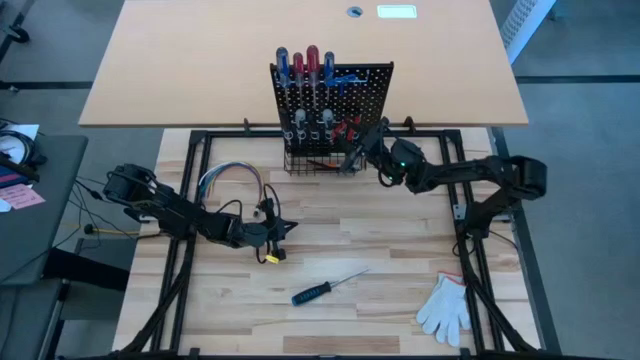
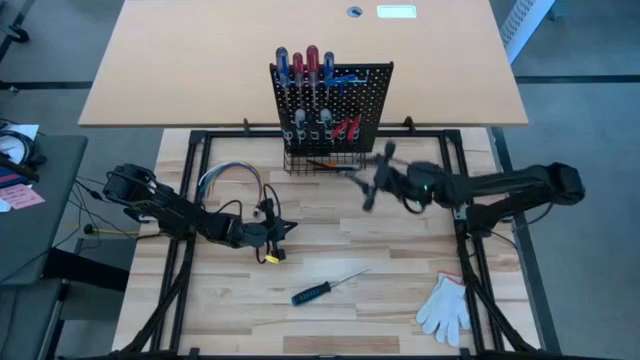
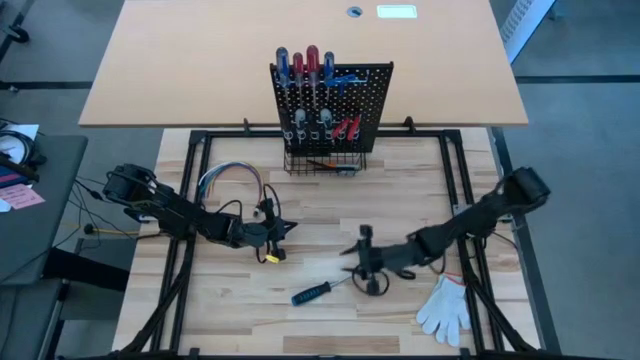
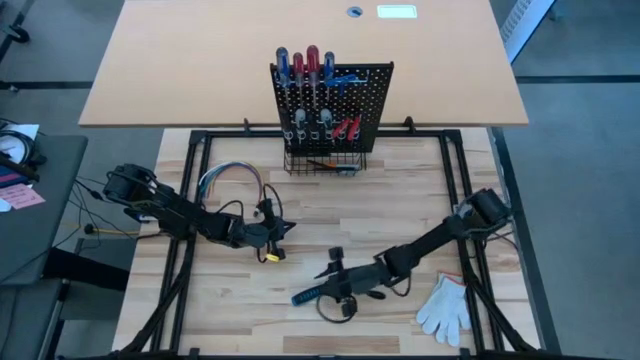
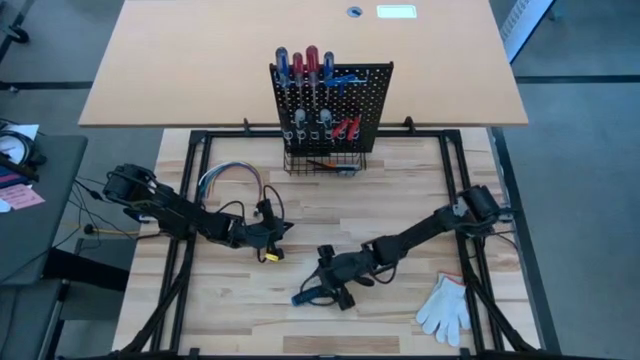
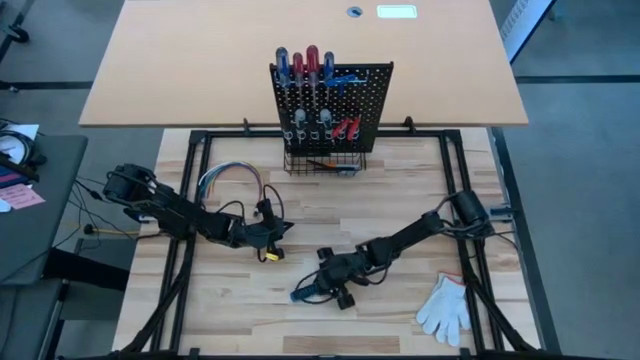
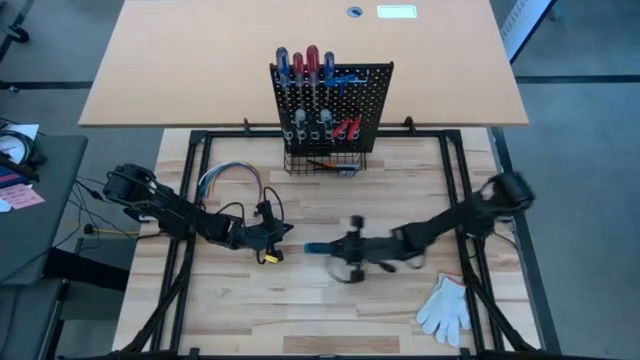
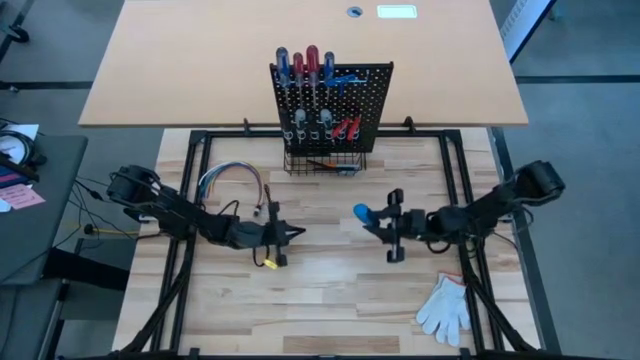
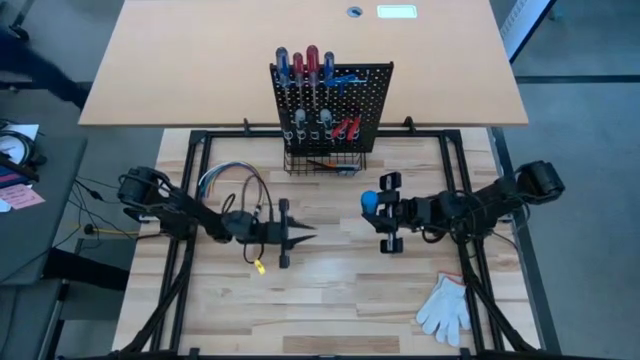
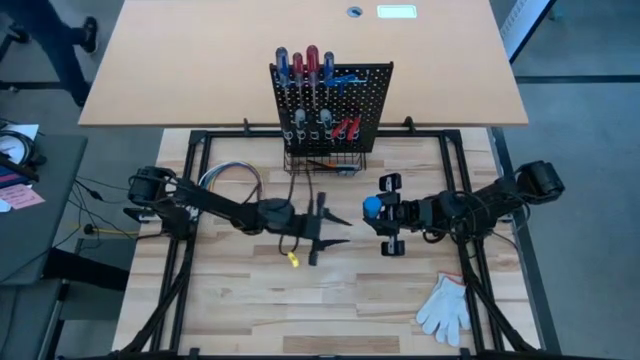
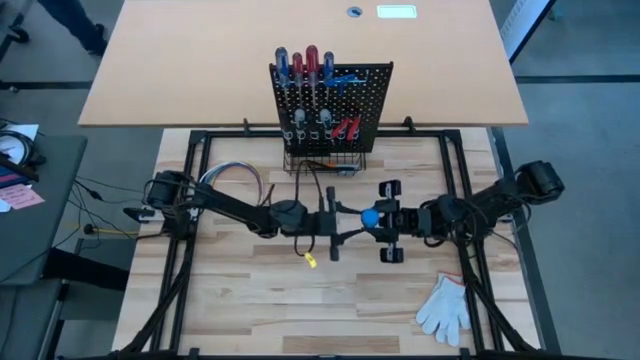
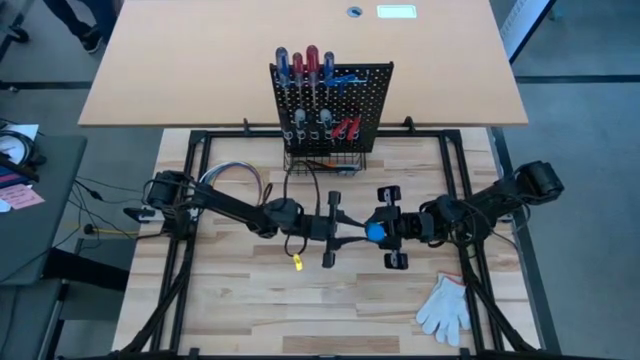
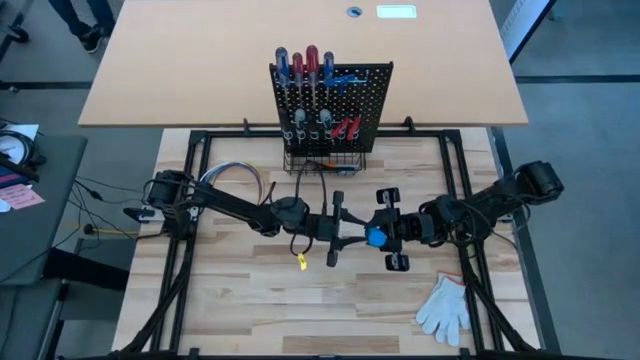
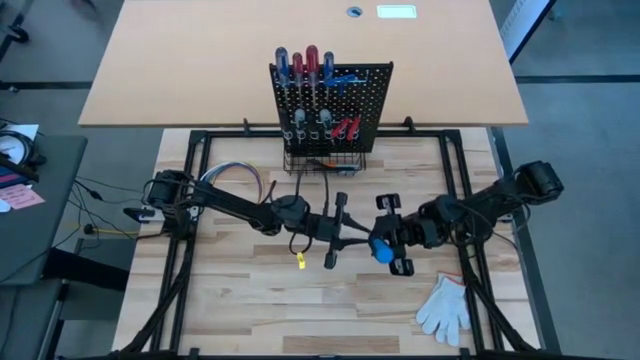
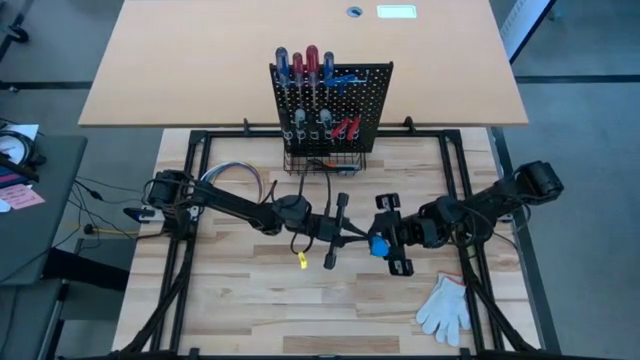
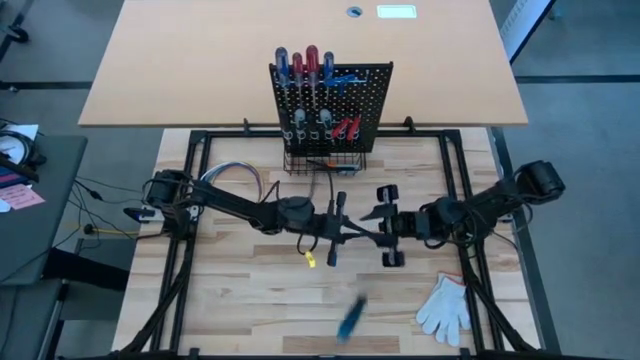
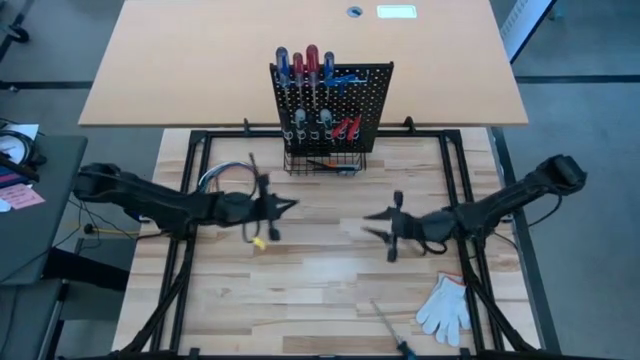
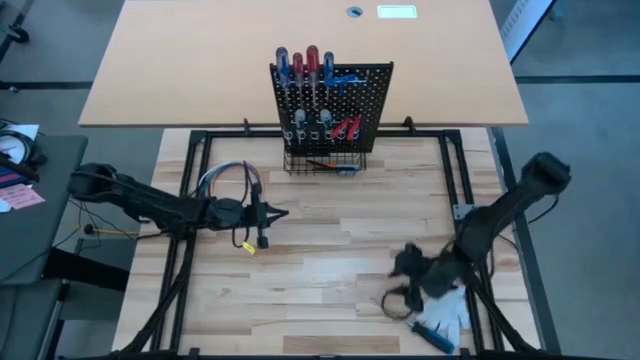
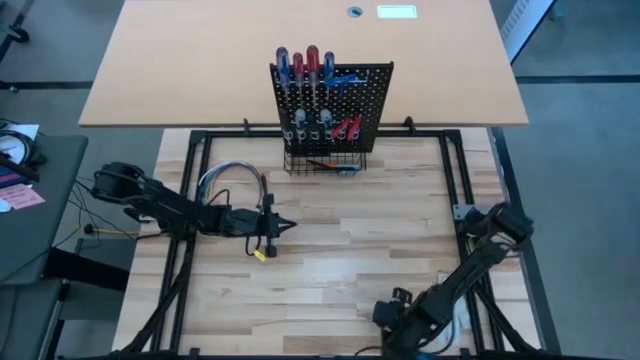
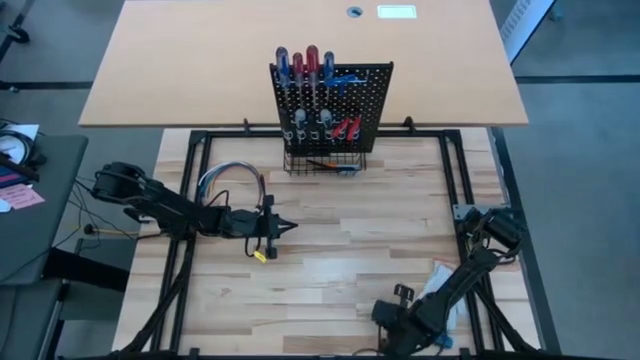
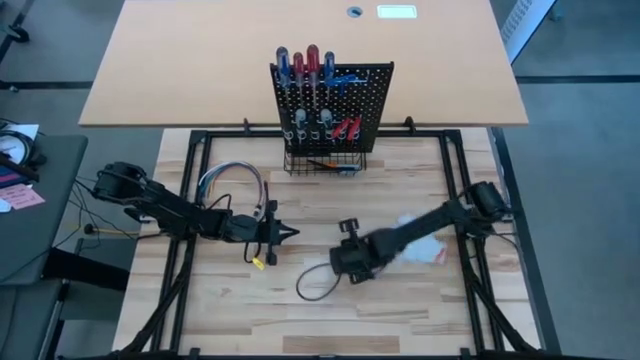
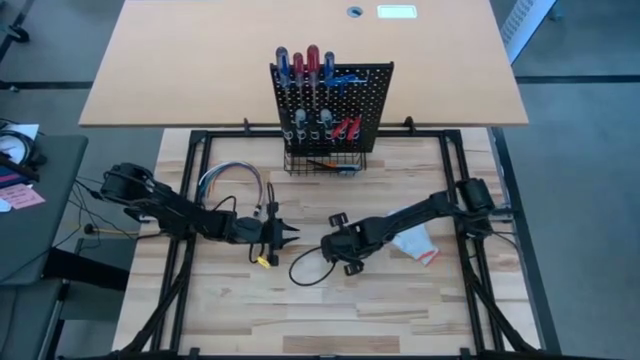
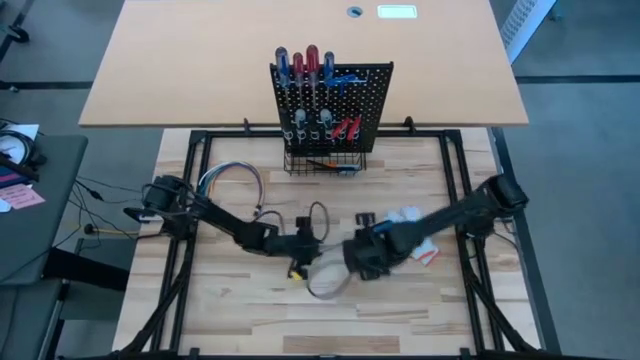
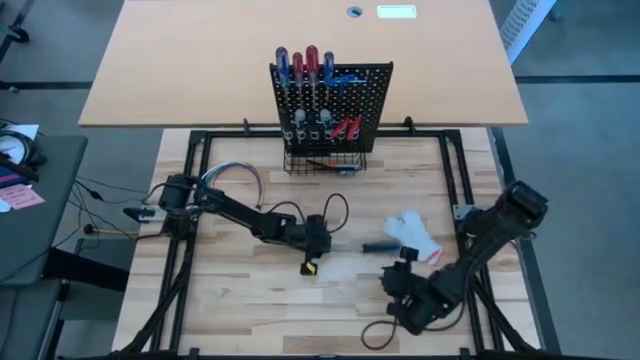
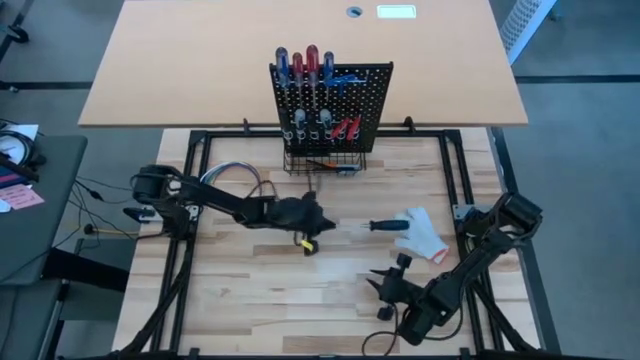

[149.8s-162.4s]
Task: Hang tools onto peg board
Hang the dark blue screwdriver on the pegboard

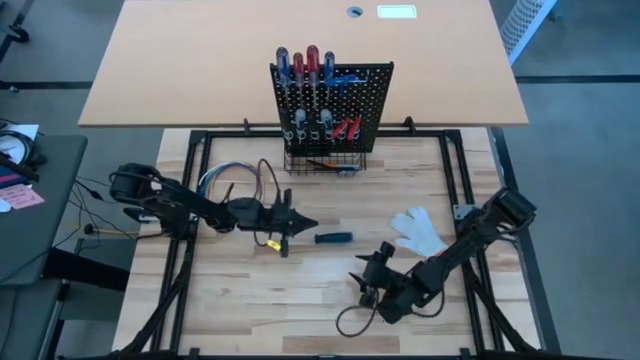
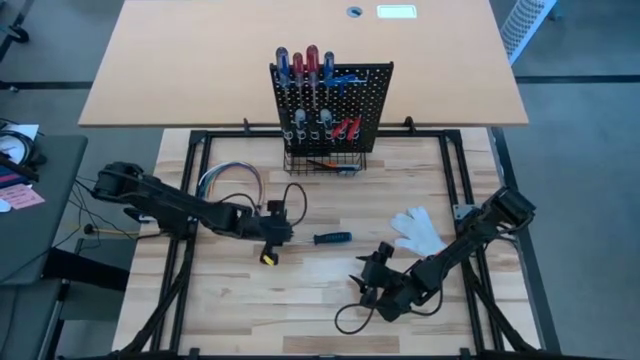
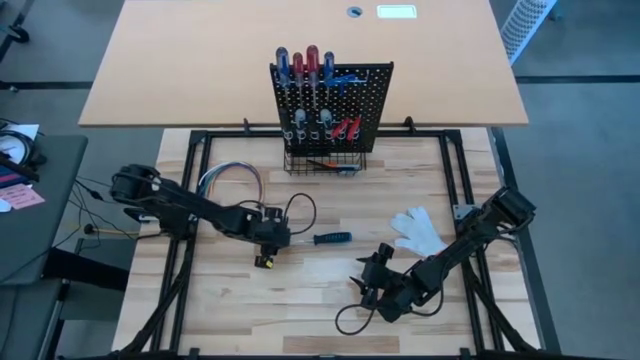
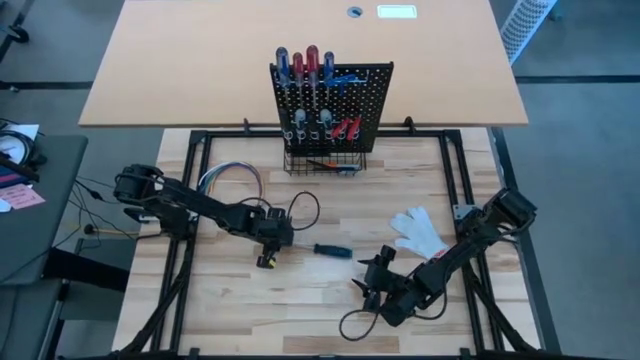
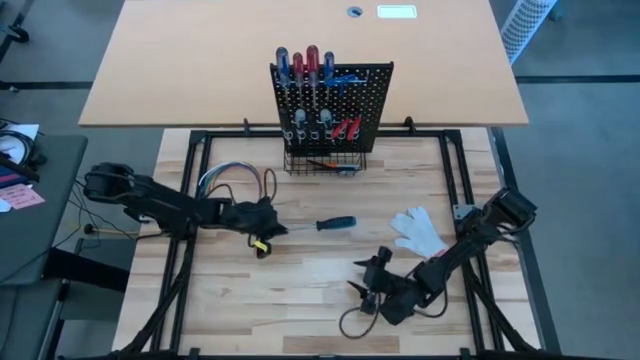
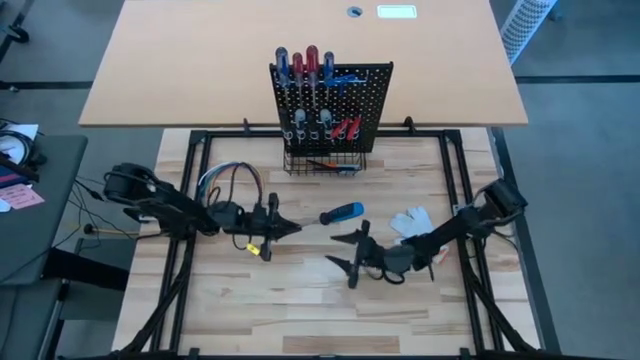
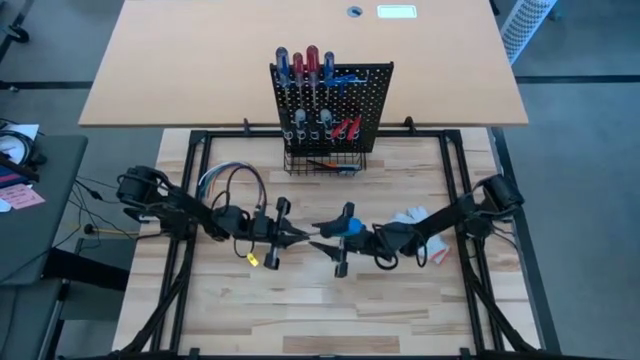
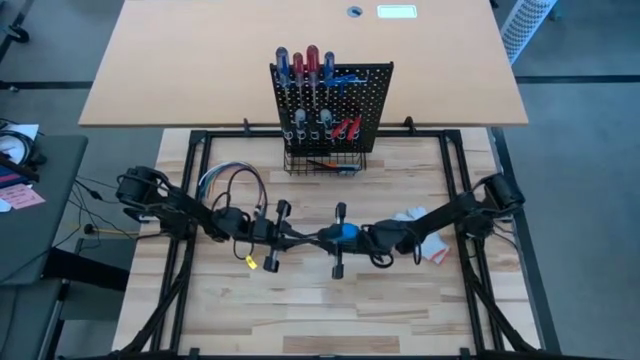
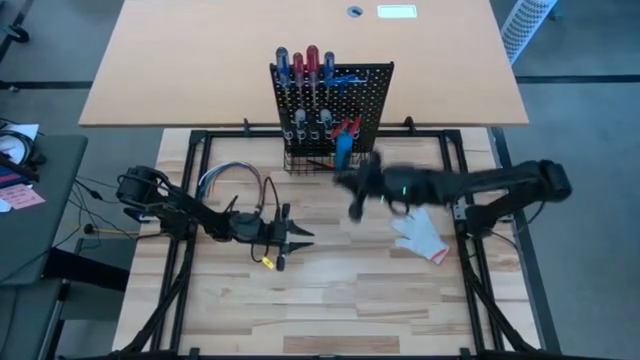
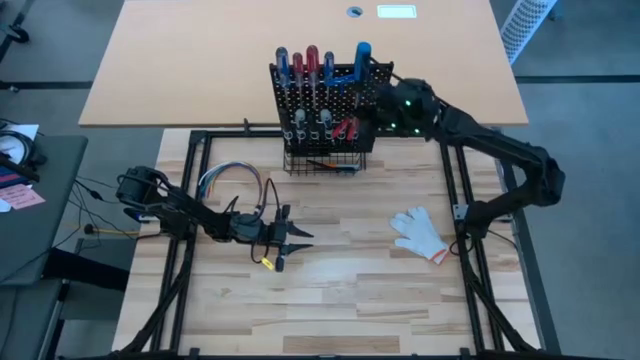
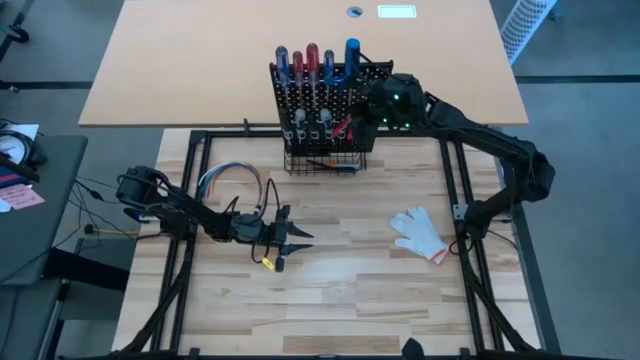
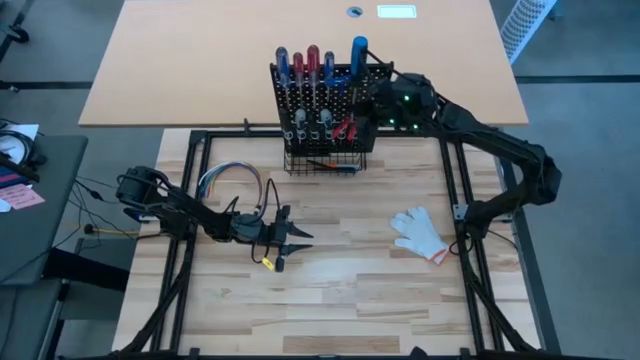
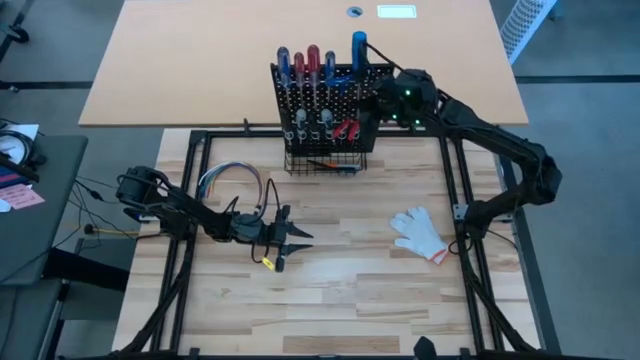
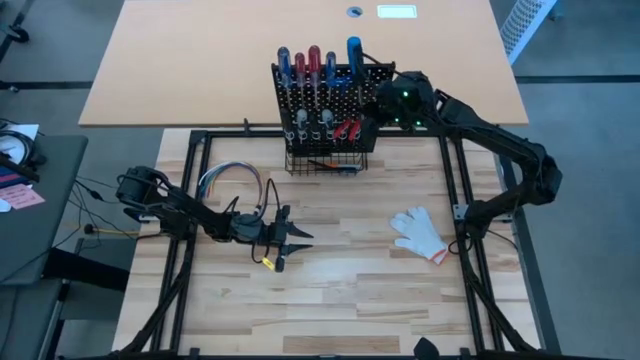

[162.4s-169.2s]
Hang the dark blue screwdriver on the pegboard

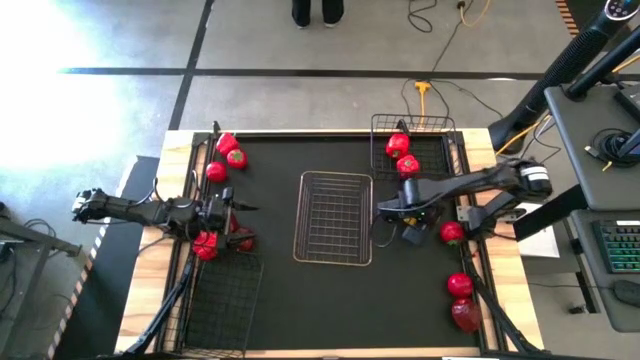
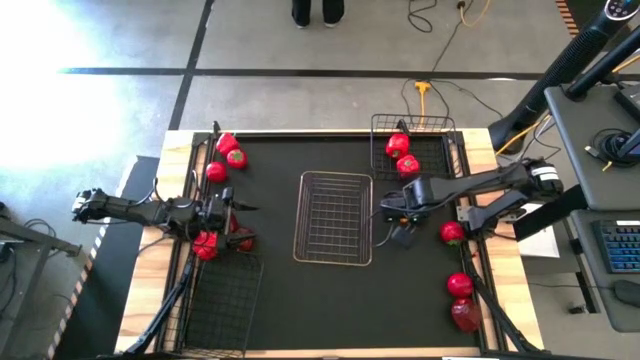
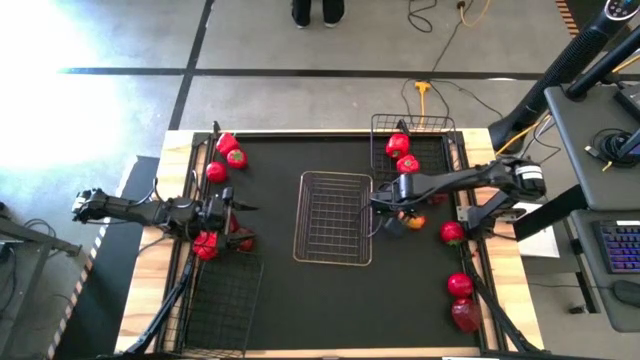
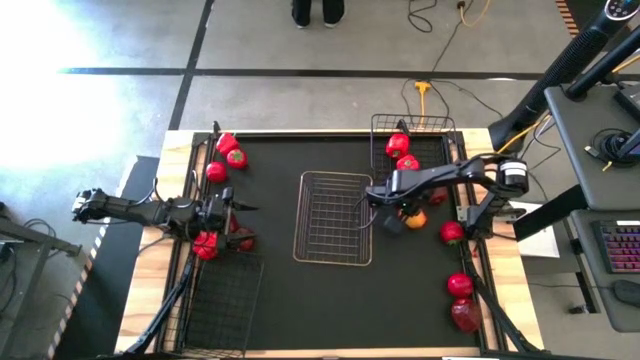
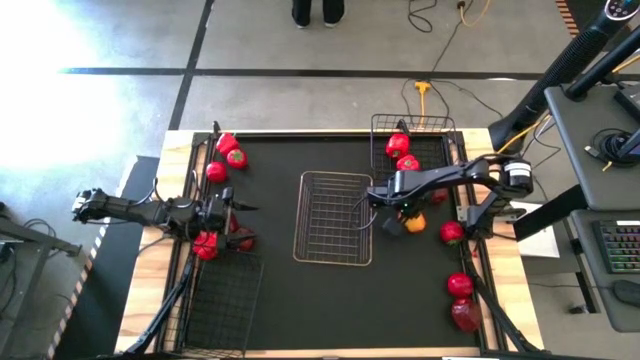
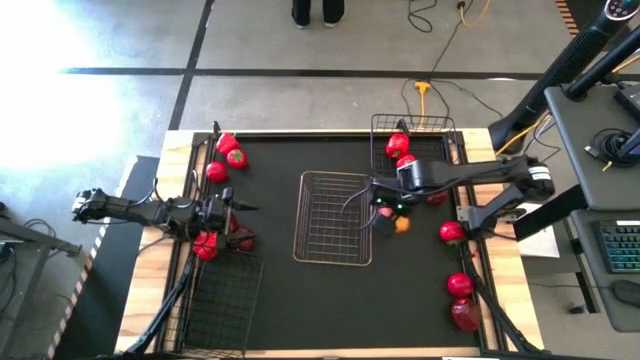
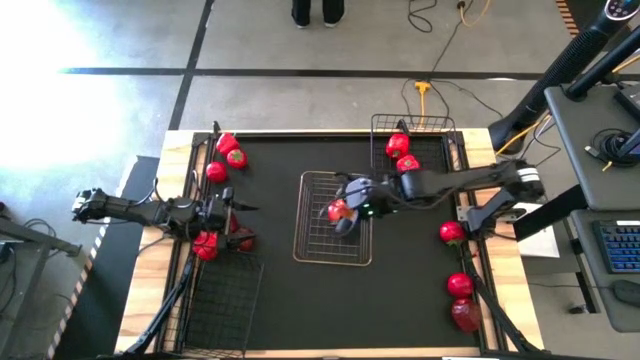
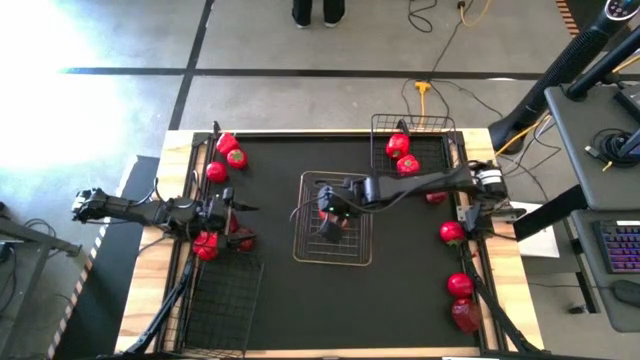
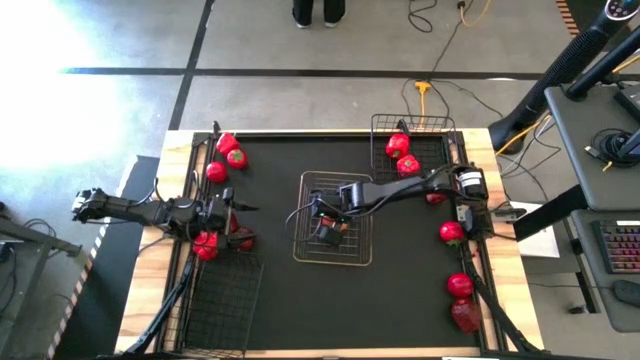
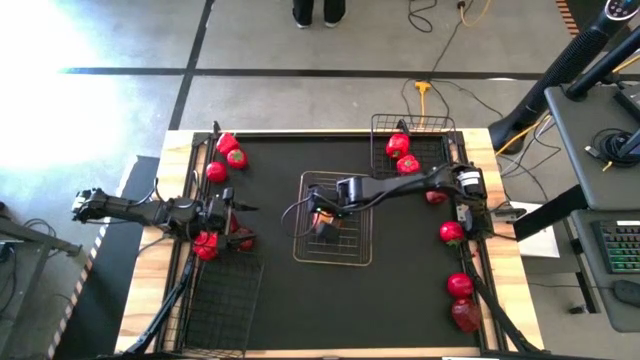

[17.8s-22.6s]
Task: Sort produce into baskets
Put the red apple into the gold wire basket
